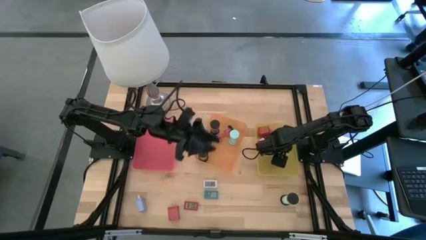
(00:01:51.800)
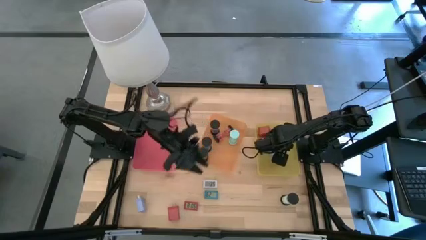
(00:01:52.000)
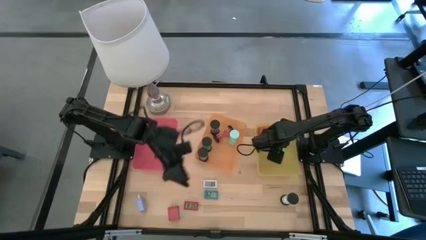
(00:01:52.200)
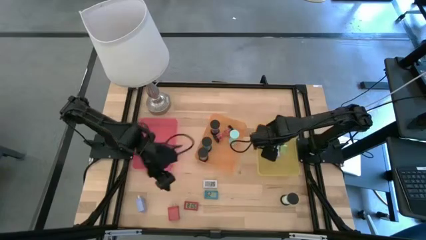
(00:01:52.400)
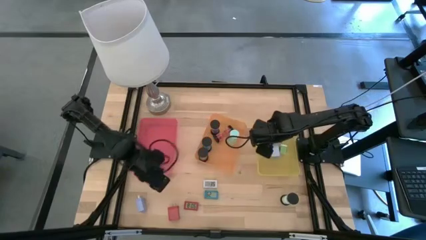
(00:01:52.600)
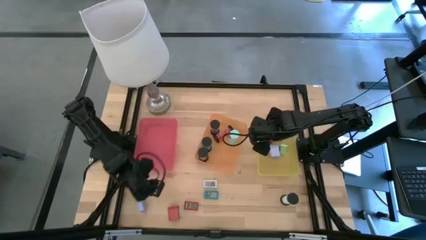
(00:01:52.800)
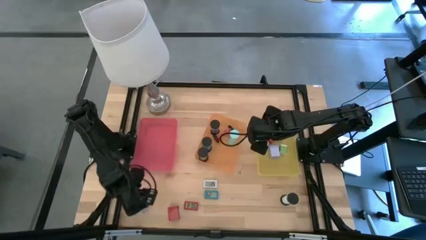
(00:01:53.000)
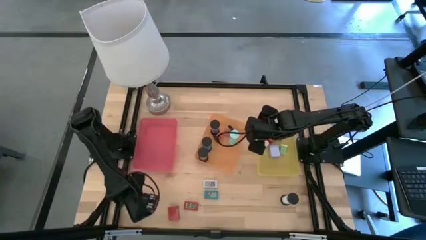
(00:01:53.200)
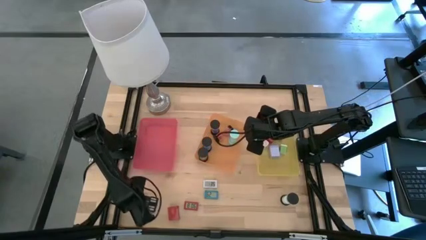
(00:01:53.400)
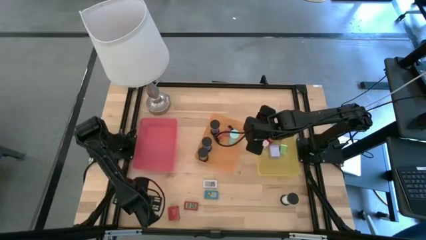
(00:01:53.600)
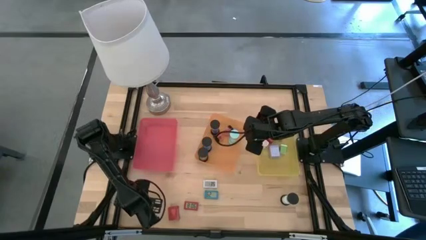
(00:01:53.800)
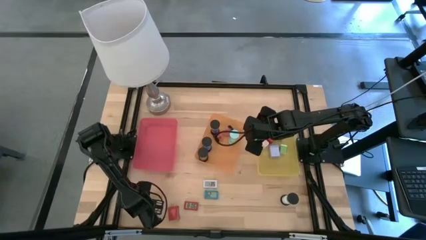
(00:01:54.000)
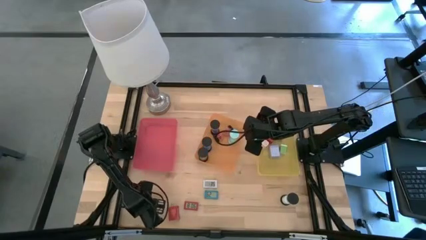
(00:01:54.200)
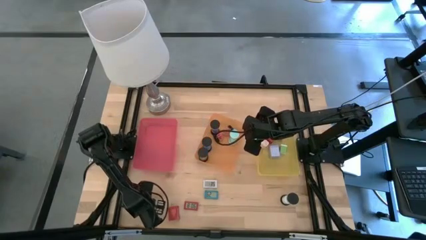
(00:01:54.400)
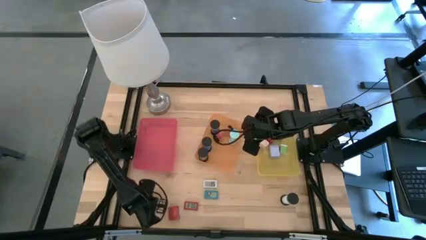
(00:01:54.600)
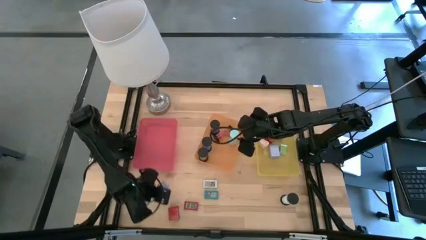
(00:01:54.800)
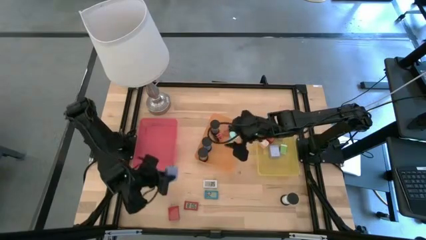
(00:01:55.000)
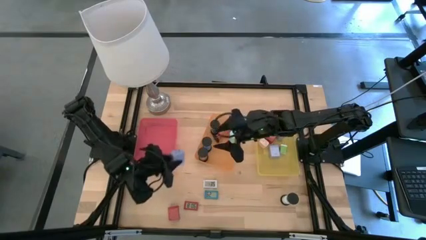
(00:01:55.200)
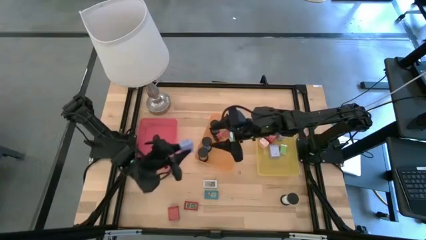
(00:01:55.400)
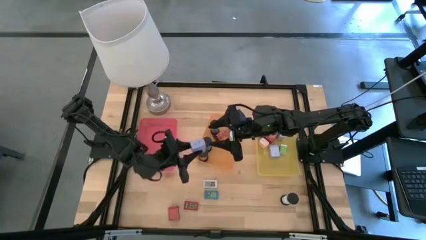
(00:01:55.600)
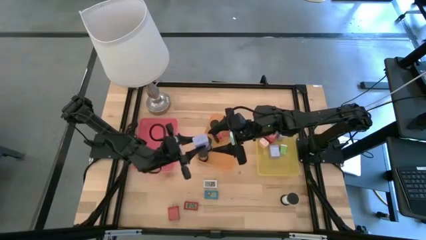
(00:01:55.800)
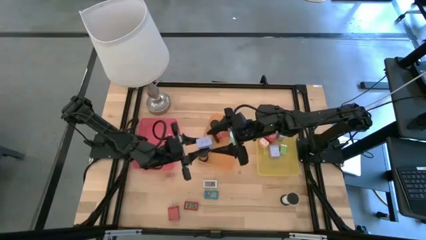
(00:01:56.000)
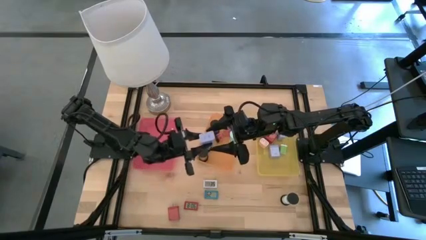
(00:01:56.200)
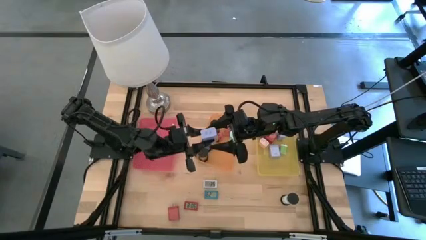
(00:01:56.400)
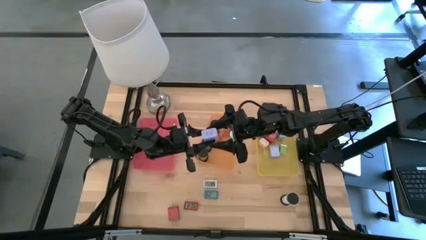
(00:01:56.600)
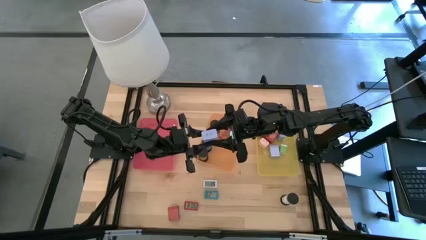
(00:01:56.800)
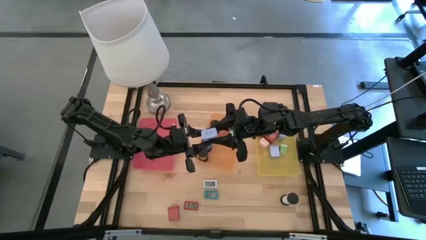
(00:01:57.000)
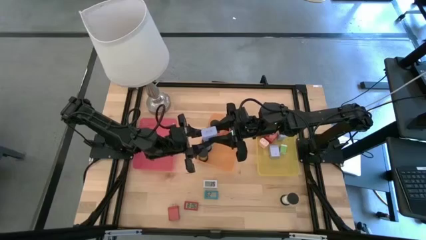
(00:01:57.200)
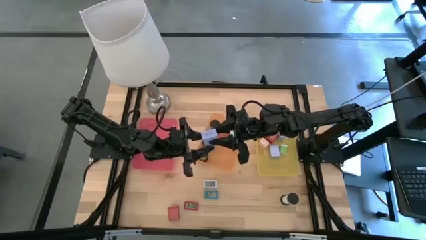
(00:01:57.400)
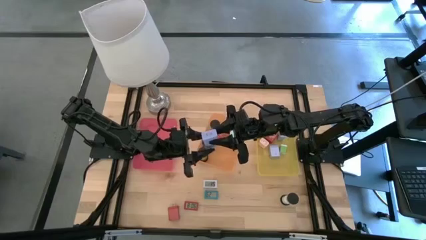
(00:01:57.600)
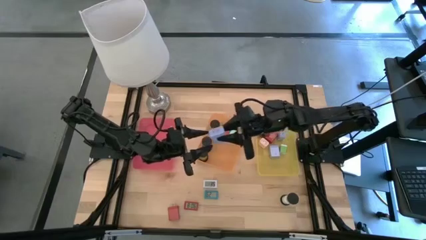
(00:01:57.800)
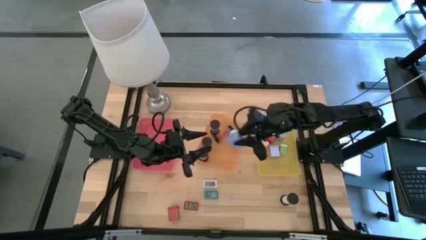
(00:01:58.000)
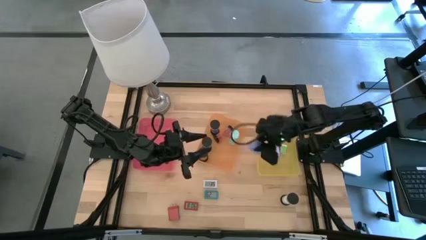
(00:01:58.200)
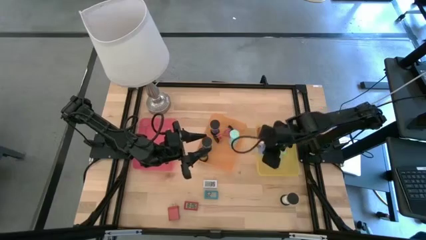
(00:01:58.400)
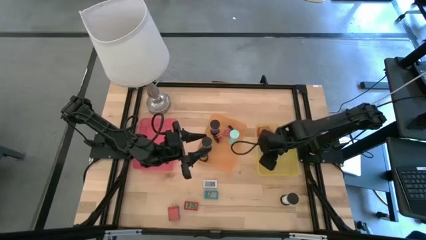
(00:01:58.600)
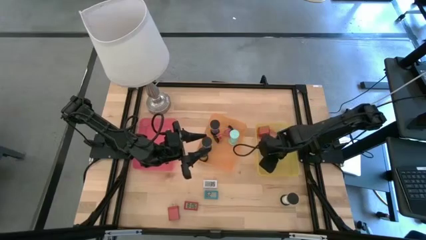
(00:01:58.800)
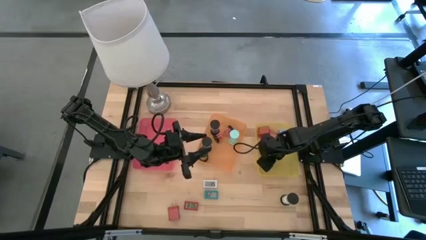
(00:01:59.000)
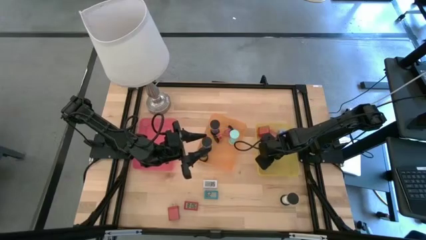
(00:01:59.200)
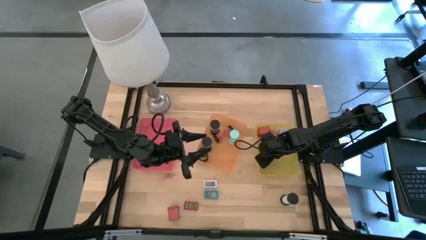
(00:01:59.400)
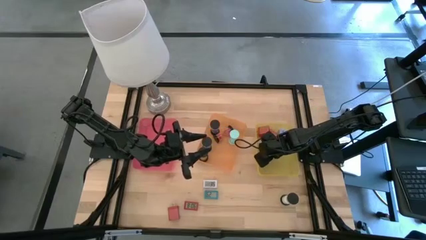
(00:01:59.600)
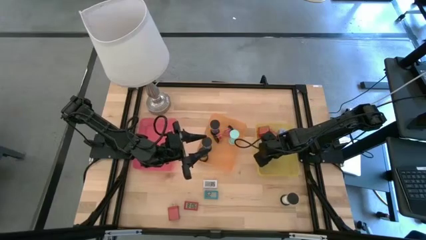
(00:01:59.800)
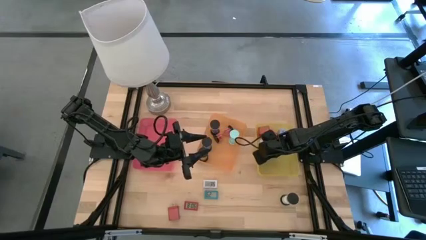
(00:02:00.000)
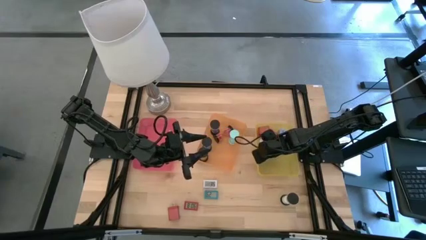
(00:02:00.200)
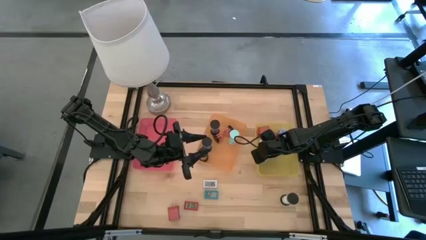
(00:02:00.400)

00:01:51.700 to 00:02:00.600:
Task: Pick & Place Office items
Put the light blue charger adapter into the yellow bin

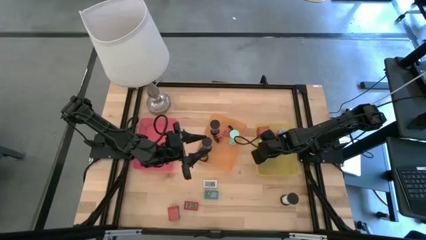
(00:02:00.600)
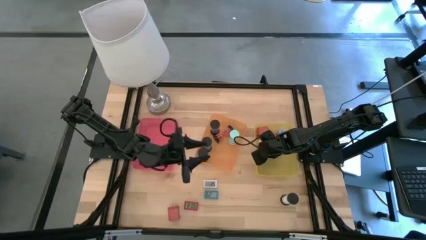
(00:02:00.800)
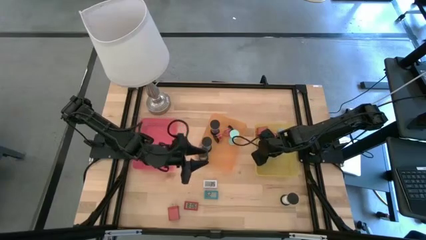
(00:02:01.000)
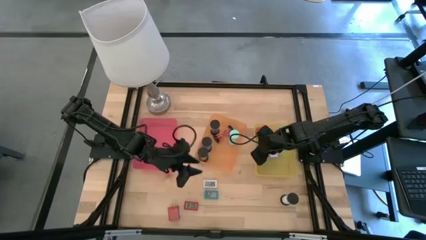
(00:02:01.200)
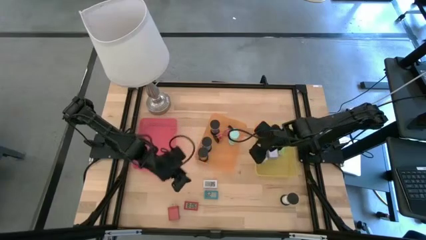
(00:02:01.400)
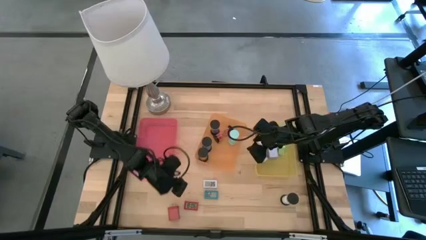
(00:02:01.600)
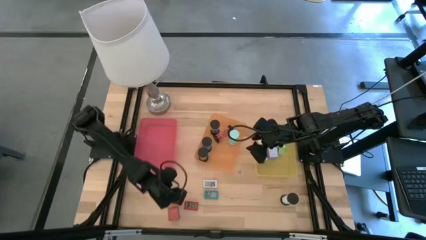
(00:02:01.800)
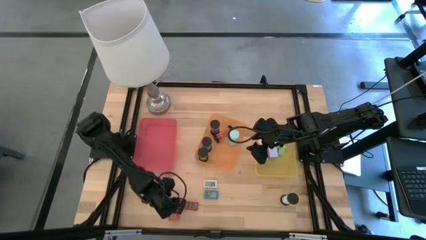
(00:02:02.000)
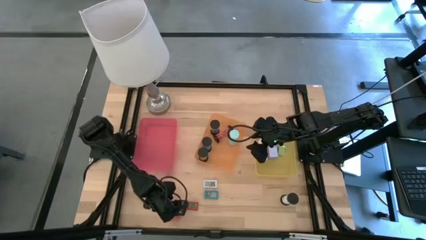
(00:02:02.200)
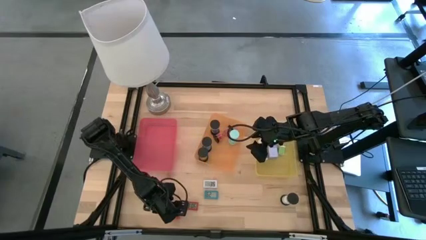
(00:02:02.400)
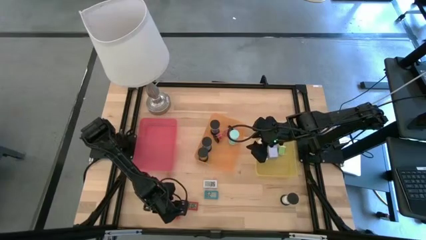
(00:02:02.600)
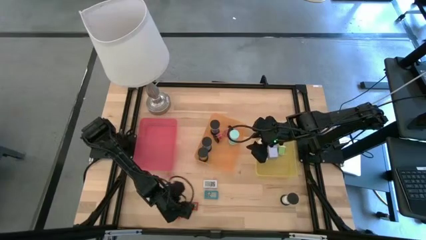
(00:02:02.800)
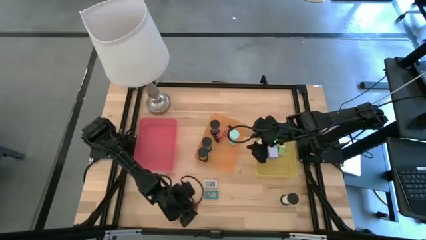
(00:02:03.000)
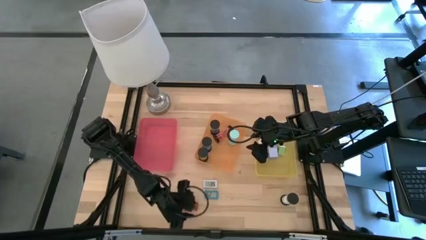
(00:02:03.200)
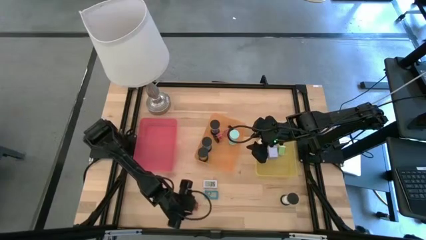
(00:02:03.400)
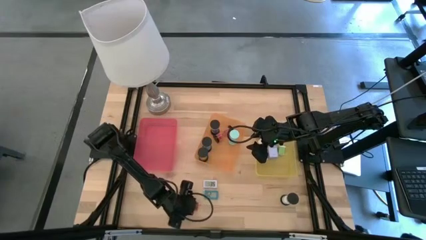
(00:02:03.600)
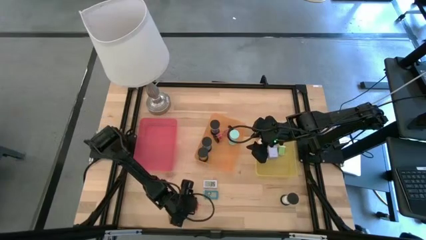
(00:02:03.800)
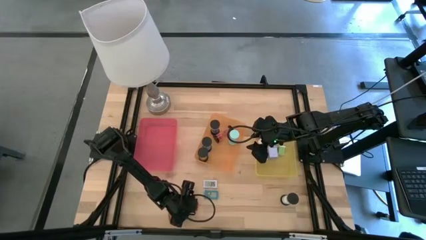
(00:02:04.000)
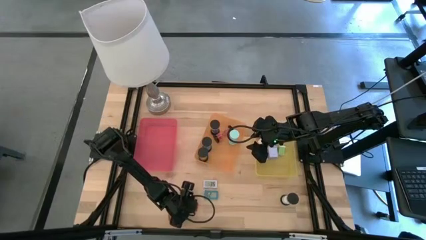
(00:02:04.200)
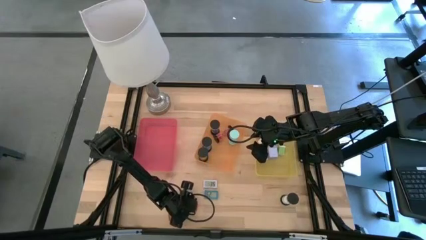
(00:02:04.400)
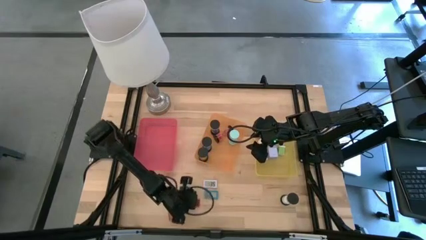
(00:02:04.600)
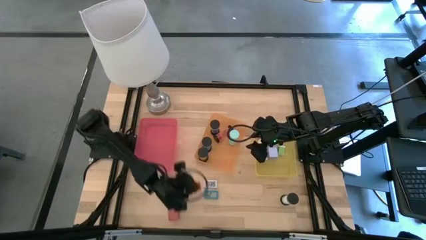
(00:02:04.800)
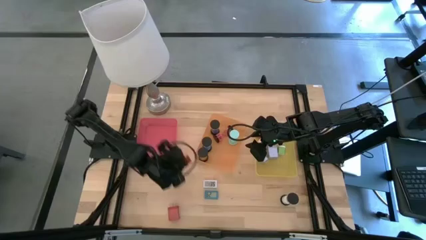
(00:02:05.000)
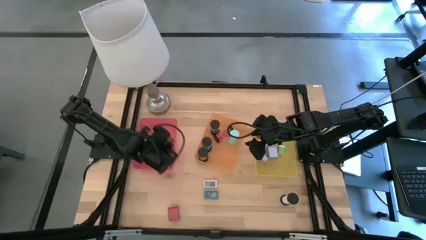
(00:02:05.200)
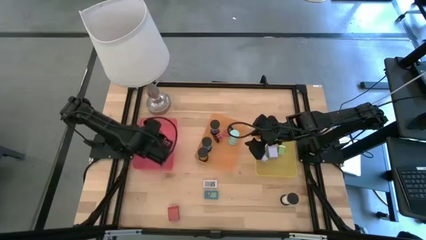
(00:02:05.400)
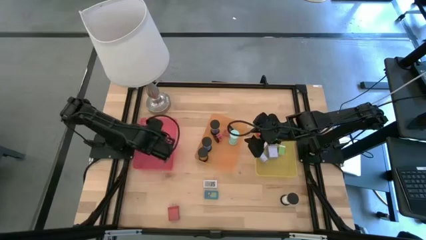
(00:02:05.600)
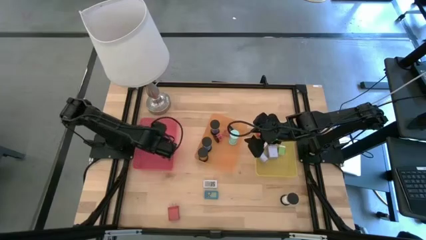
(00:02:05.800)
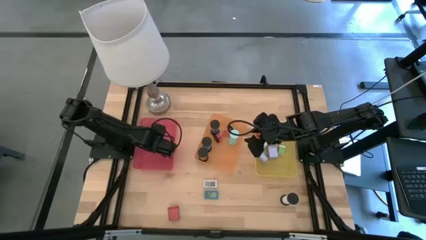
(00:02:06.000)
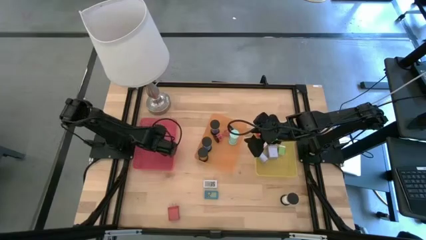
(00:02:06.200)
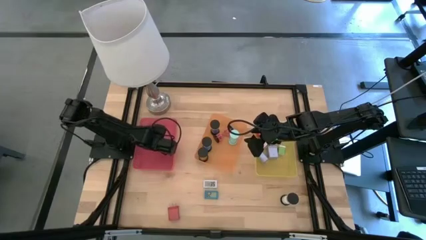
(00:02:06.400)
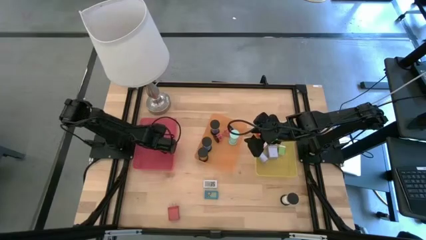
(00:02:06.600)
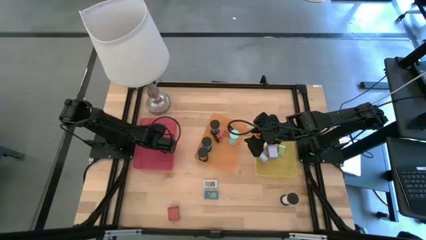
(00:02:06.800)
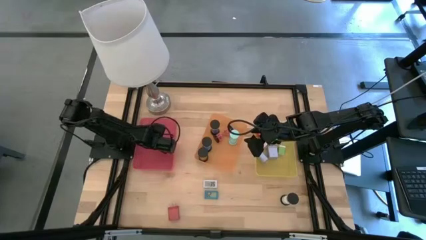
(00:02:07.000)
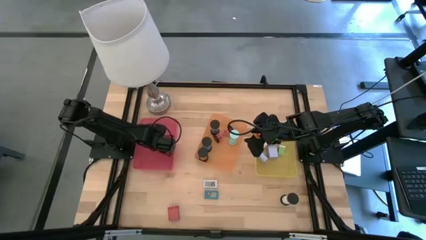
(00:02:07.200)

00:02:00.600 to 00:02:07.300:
Put the red digital clock into the pink bin
